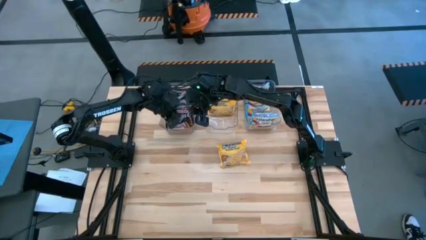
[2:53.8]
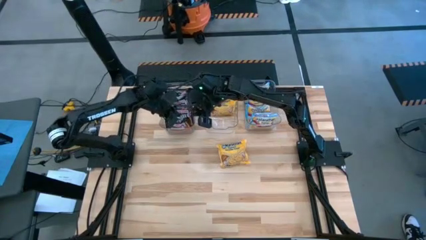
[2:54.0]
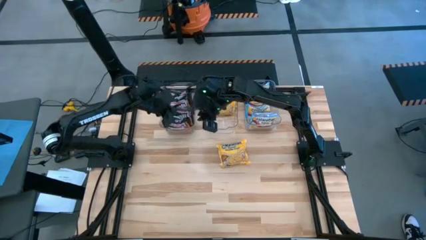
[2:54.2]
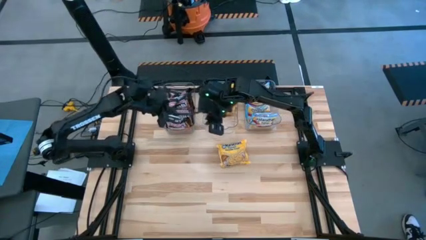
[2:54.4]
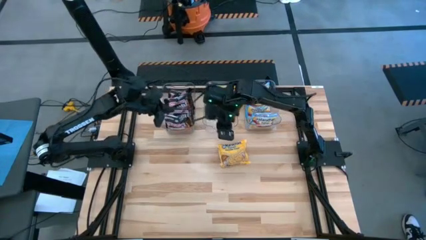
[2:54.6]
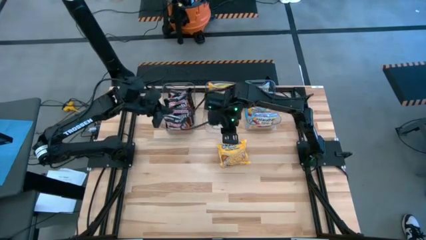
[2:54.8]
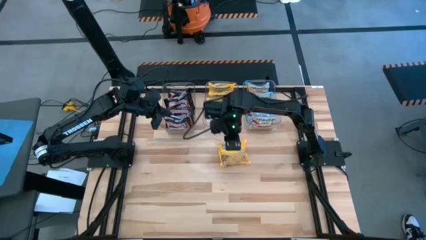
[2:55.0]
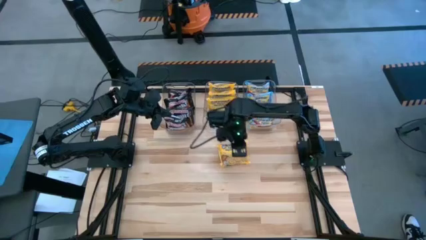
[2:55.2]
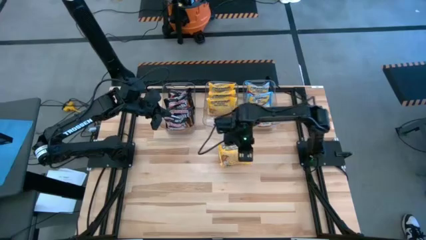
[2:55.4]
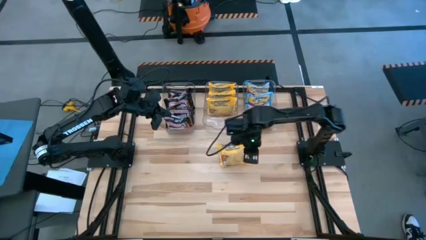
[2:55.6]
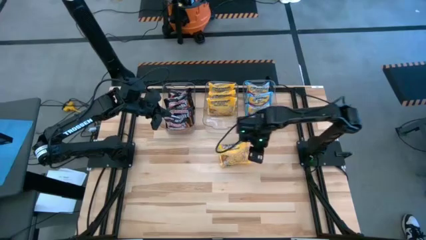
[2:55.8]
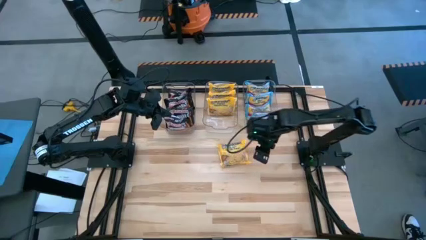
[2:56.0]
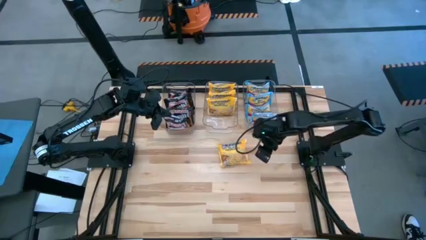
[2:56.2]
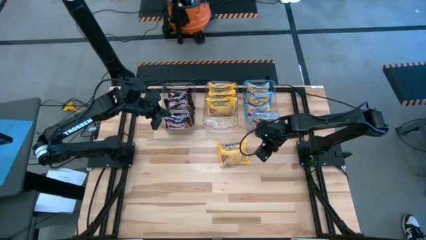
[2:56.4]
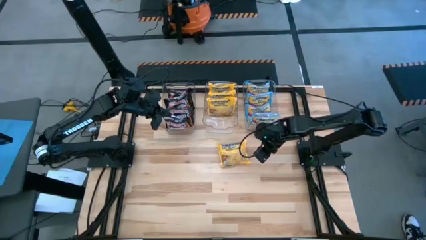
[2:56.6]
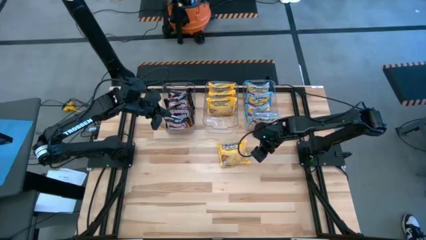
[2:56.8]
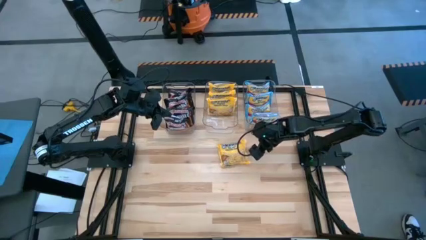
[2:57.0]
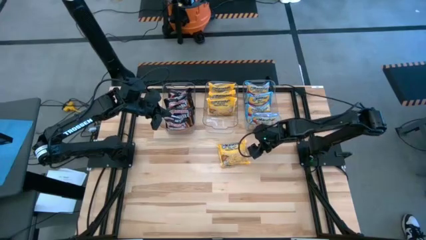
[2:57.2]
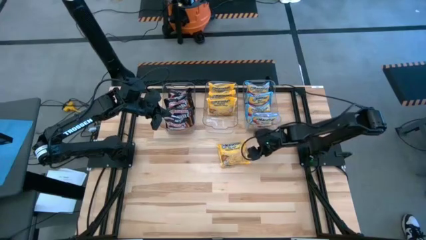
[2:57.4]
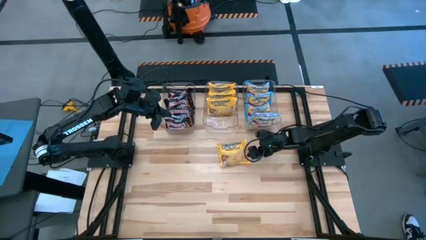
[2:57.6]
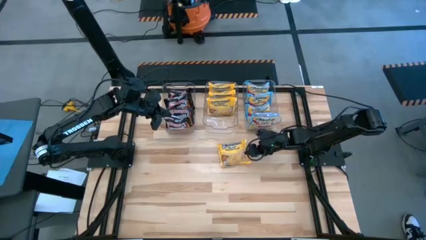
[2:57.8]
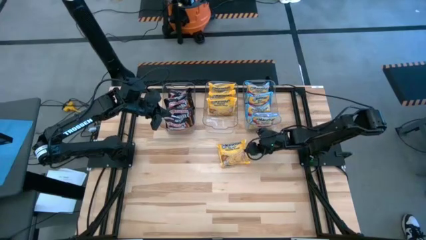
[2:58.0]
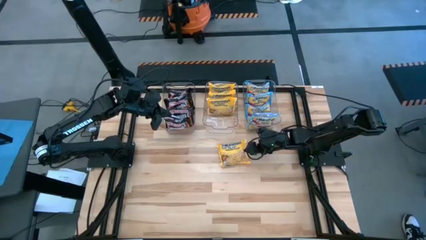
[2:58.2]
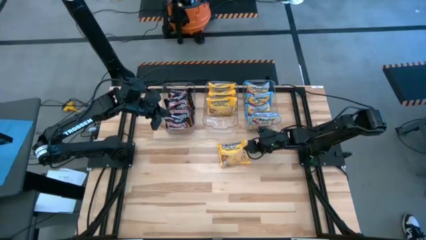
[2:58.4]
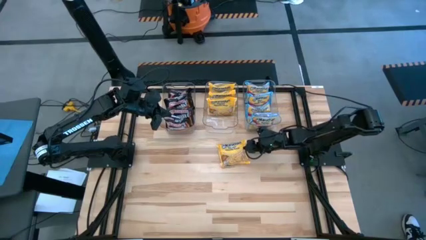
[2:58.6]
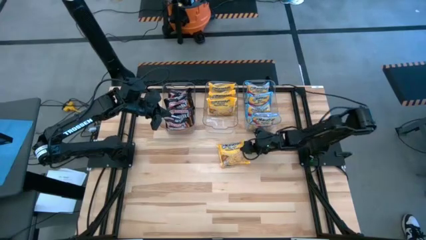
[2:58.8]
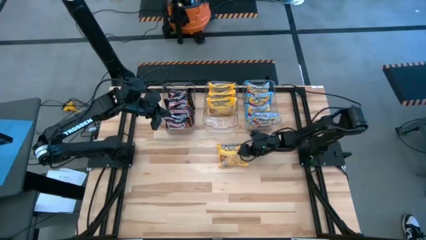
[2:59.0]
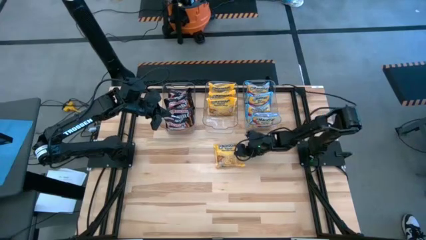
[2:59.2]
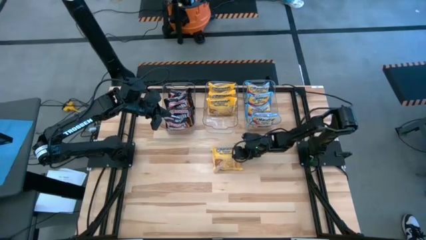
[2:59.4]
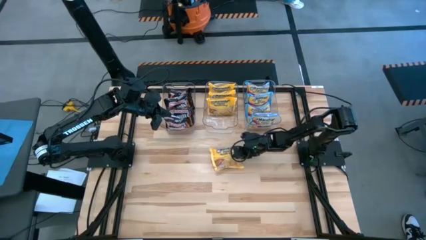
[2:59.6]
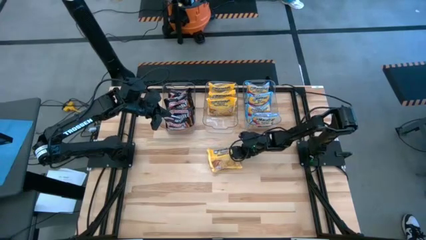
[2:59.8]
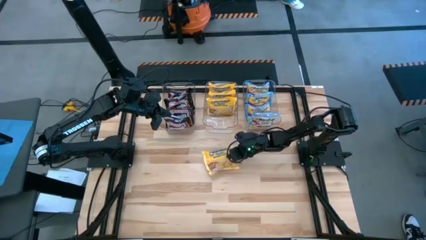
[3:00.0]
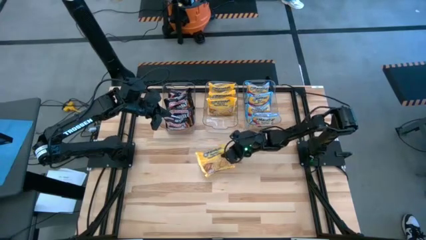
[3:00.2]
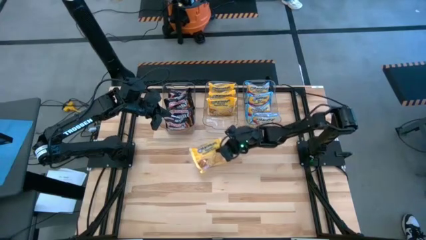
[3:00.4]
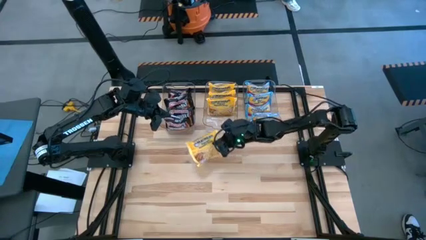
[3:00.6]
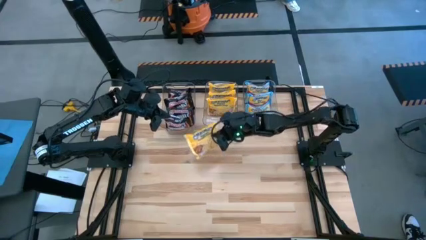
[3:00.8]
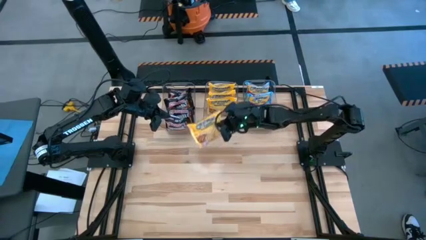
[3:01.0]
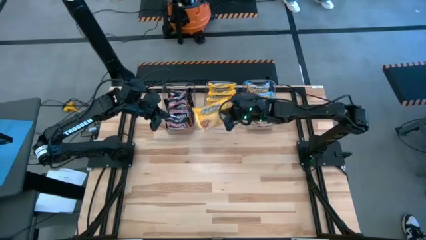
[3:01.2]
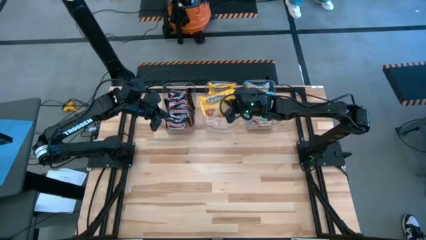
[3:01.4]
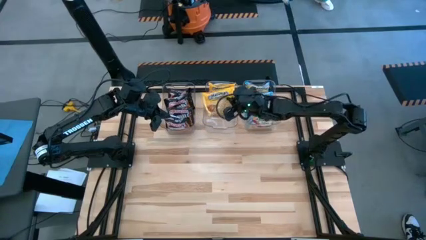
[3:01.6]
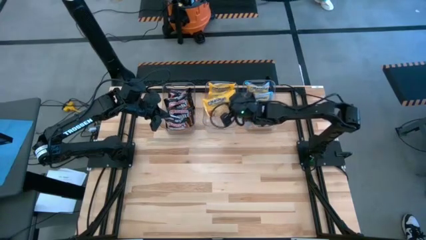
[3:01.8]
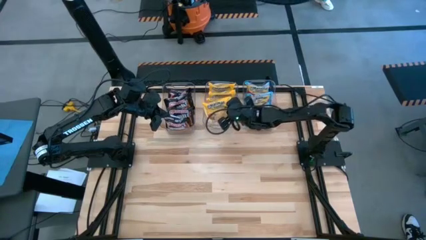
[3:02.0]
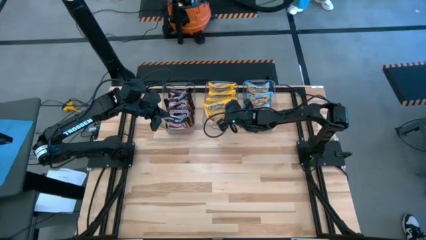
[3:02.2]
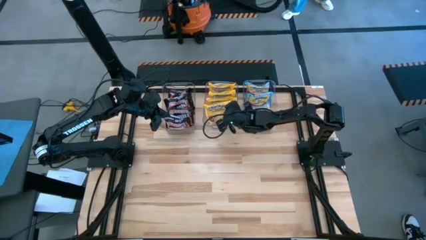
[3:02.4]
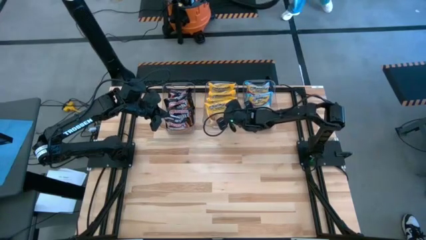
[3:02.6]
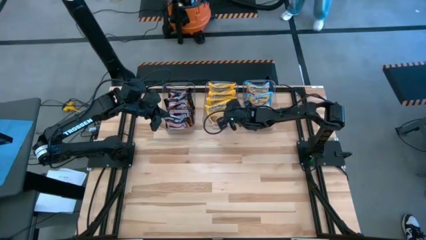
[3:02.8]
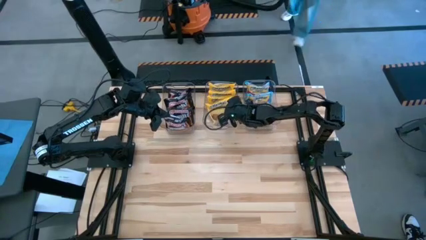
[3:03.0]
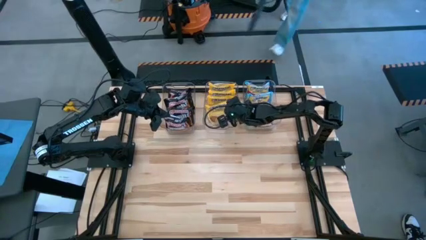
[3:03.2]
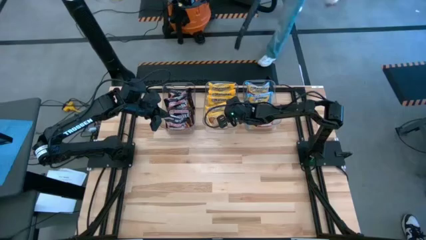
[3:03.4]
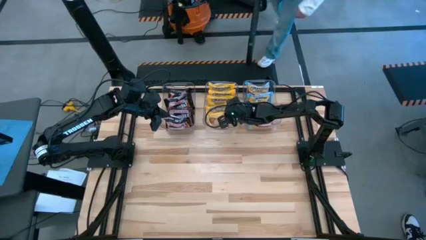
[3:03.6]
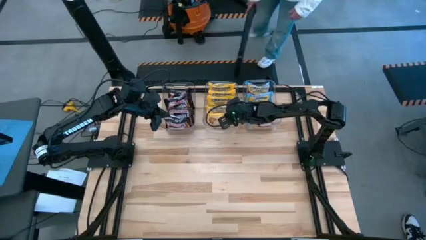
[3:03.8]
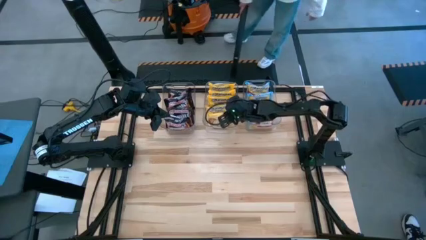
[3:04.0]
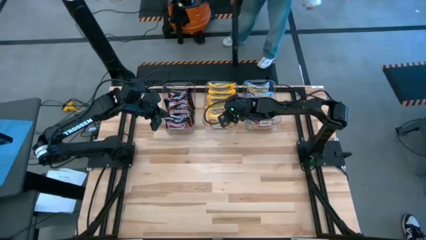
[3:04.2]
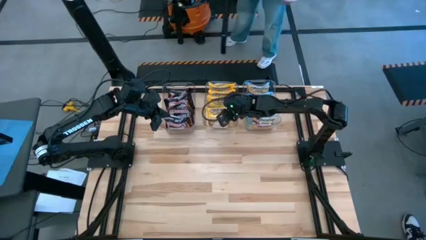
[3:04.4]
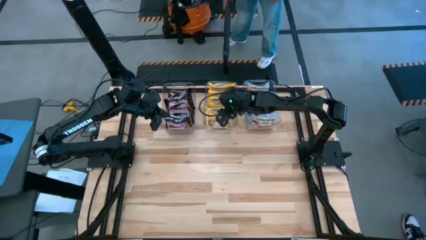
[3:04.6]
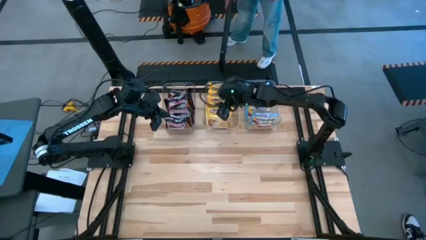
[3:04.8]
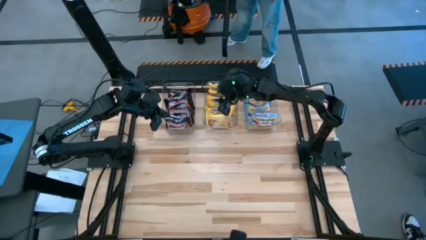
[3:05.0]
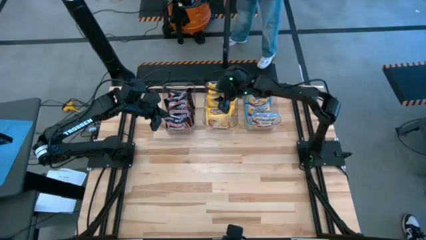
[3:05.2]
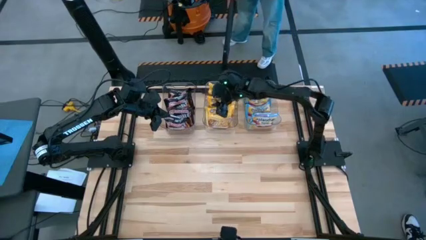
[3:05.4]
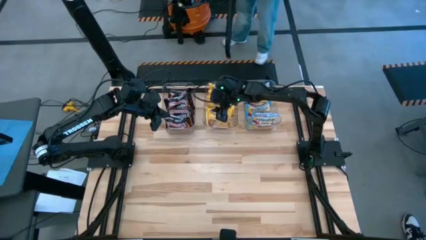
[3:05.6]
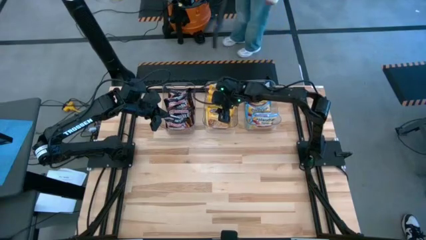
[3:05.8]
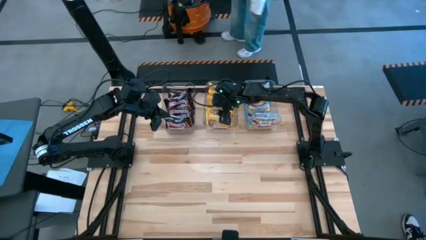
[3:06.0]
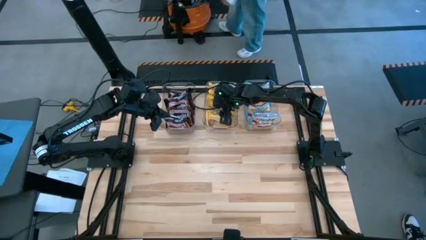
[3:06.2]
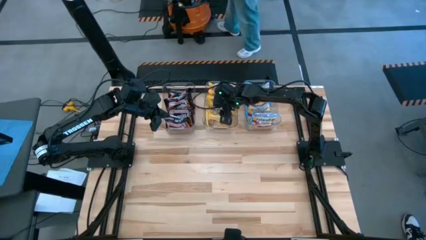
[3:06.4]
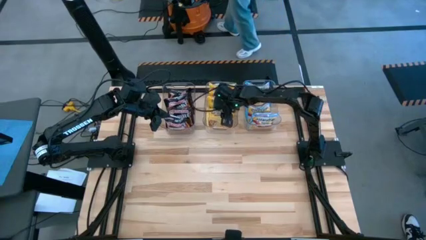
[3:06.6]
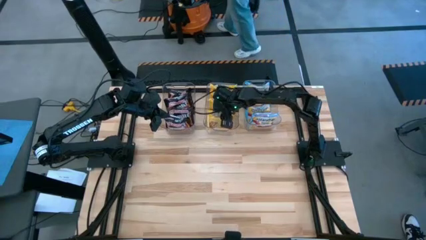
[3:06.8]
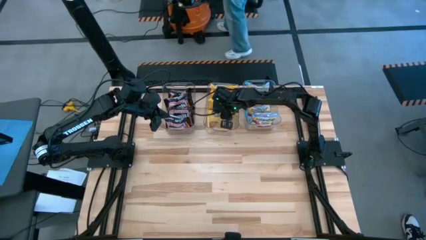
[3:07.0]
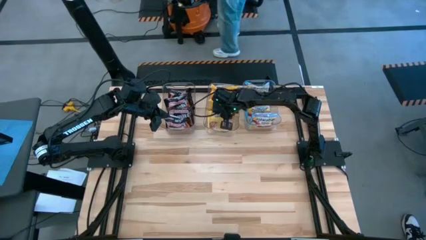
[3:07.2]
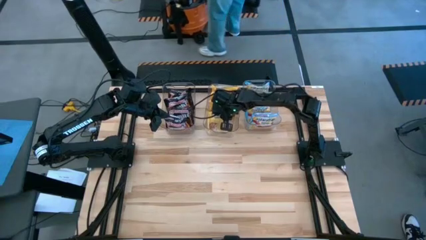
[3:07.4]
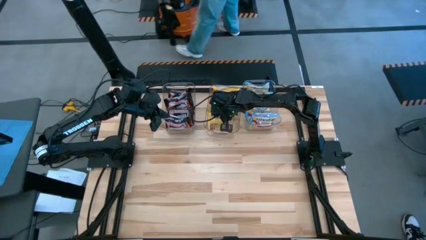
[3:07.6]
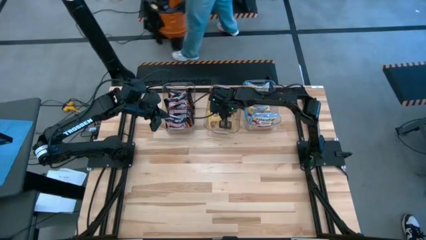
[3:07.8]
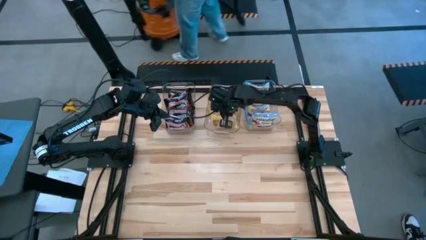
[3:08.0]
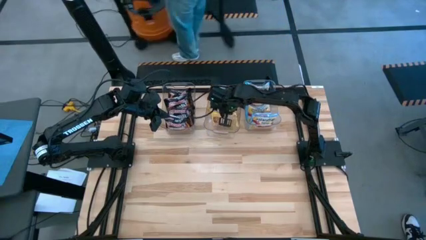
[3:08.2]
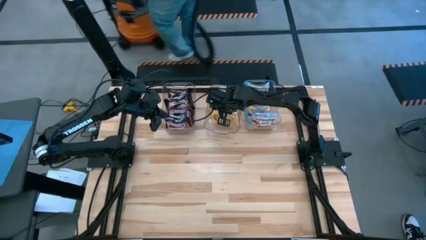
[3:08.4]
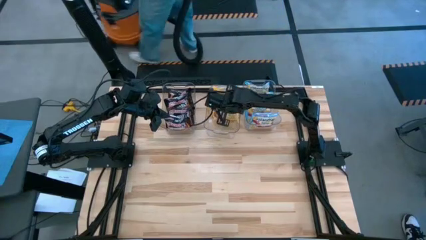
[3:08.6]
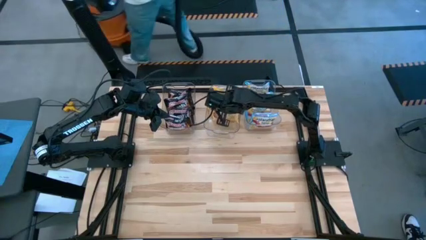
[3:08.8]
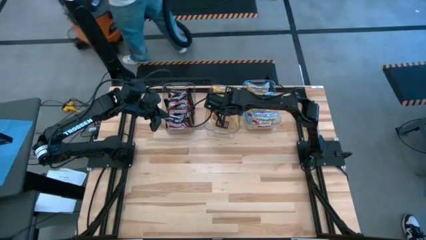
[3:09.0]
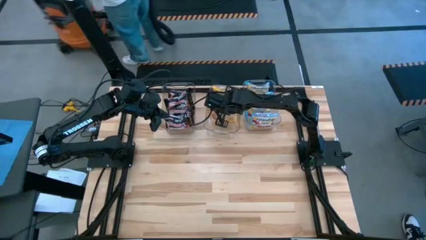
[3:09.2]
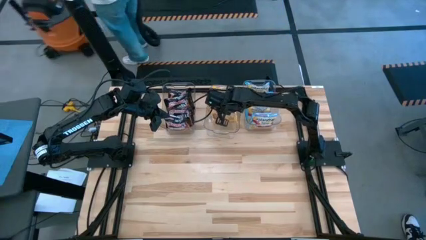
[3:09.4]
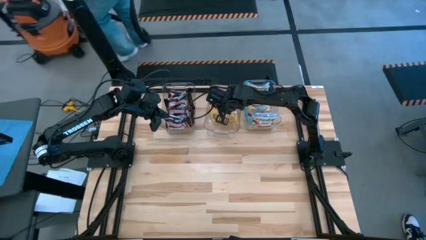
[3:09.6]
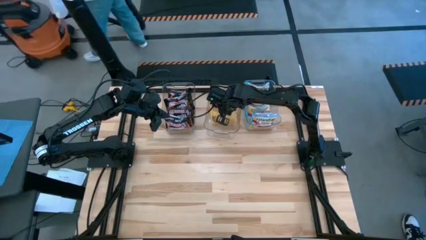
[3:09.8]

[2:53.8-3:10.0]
Task: Sort Maruchan noodles
Put the yellow noodle pack into the middle transparent bin

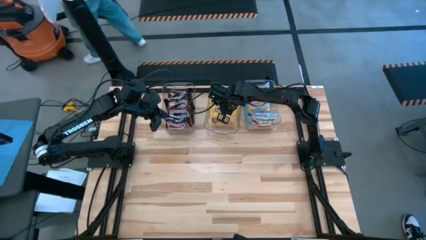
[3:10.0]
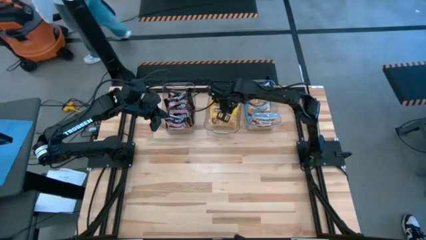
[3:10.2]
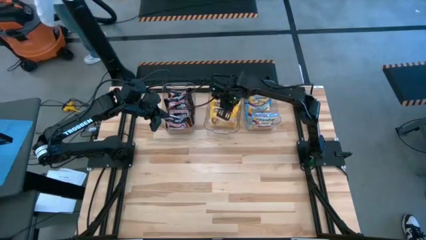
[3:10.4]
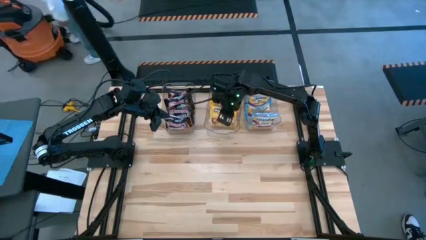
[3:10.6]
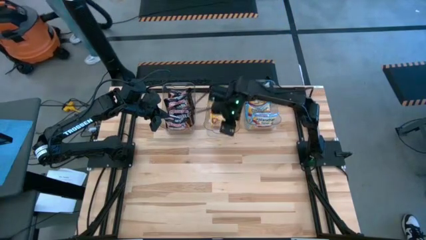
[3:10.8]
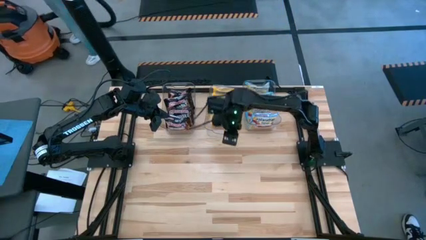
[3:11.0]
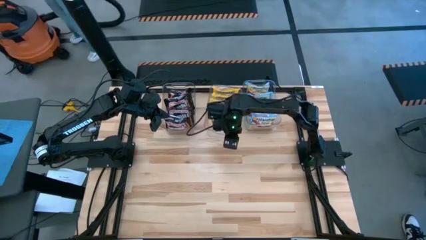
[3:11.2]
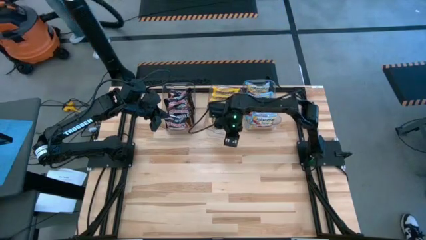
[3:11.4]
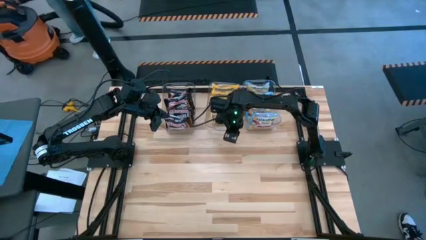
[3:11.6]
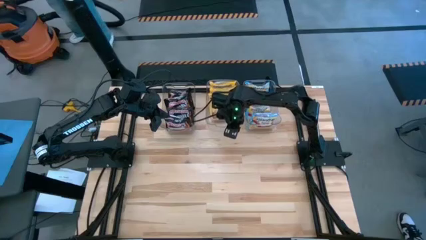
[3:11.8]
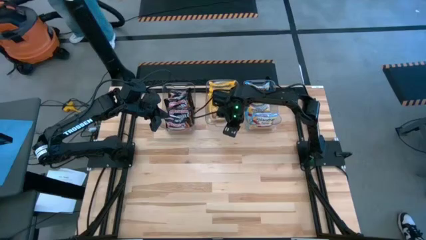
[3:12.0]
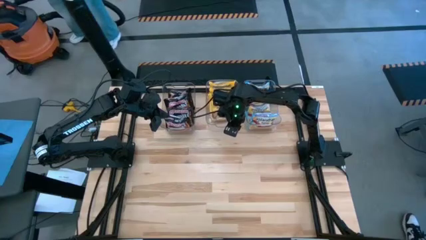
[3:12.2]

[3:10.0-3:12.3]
Adjust the middle transparent bin
